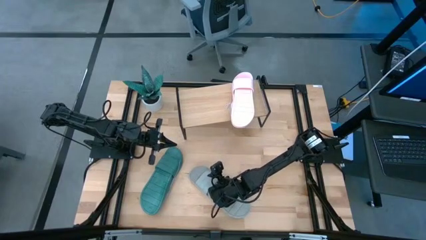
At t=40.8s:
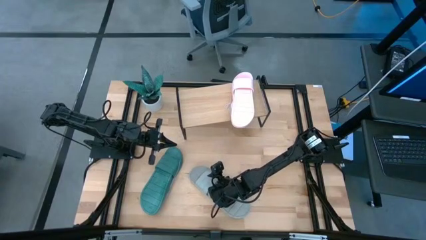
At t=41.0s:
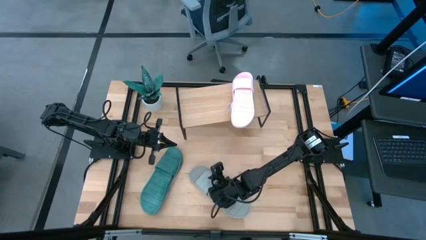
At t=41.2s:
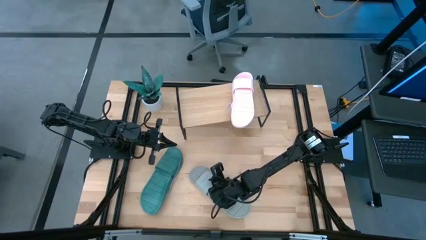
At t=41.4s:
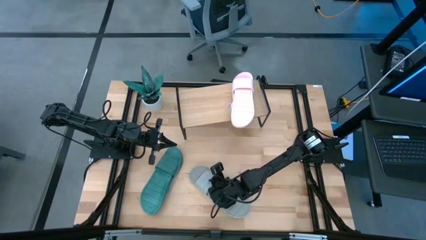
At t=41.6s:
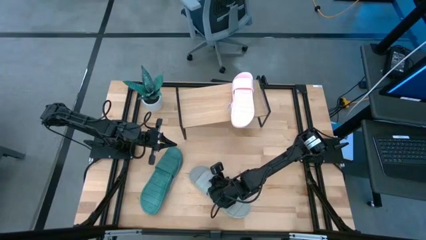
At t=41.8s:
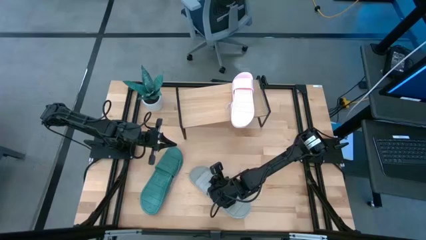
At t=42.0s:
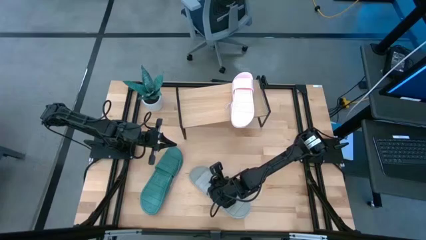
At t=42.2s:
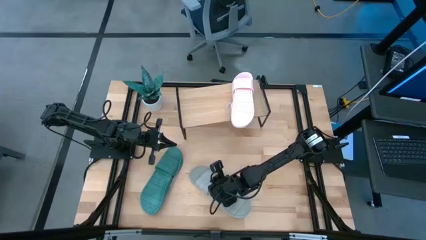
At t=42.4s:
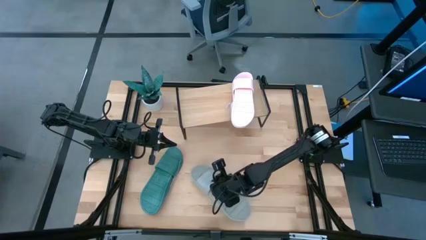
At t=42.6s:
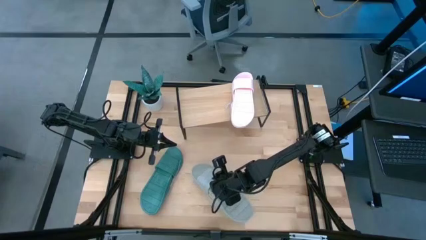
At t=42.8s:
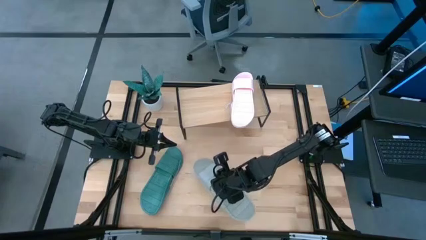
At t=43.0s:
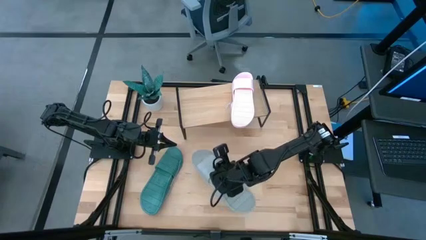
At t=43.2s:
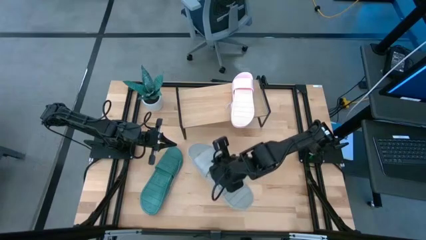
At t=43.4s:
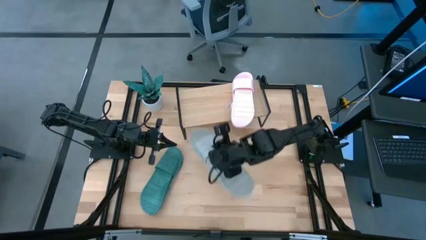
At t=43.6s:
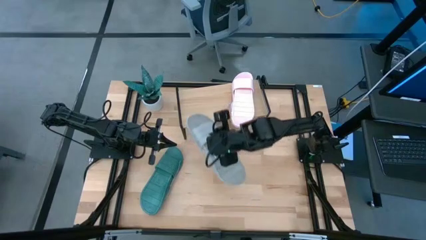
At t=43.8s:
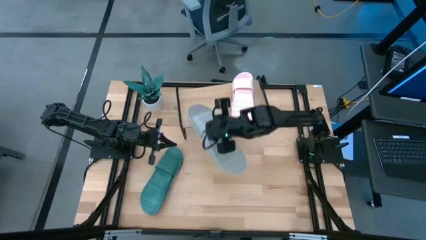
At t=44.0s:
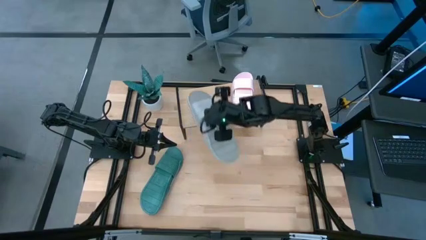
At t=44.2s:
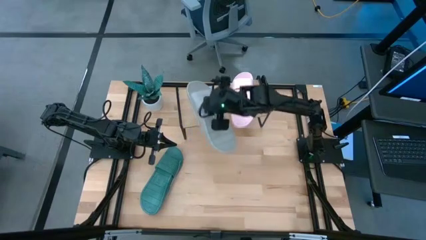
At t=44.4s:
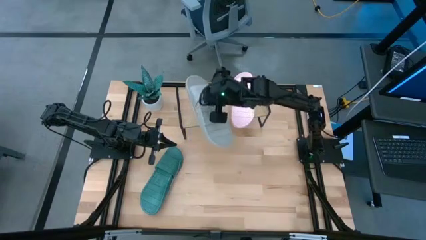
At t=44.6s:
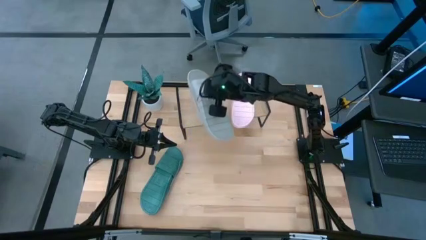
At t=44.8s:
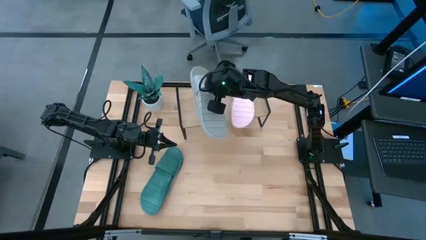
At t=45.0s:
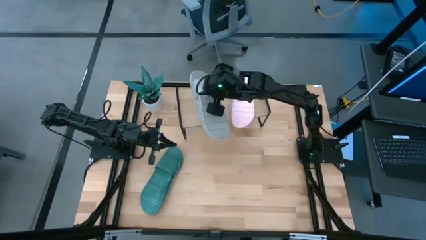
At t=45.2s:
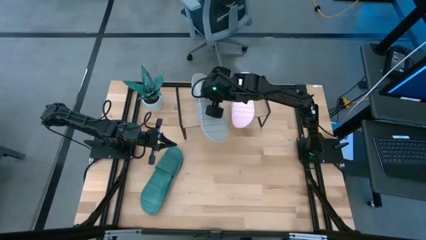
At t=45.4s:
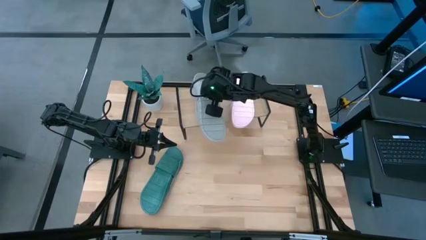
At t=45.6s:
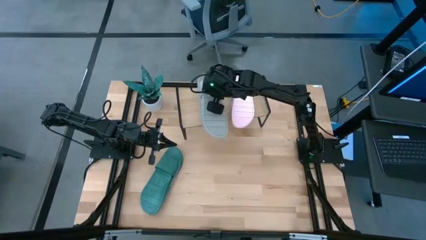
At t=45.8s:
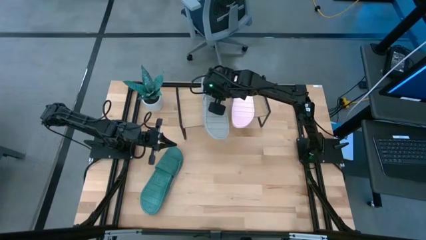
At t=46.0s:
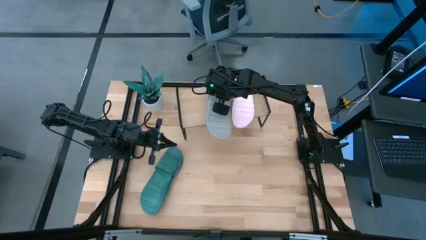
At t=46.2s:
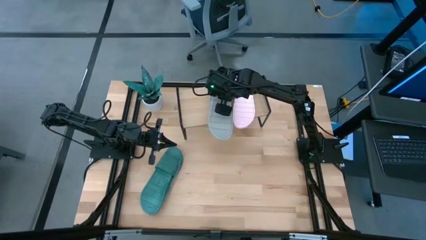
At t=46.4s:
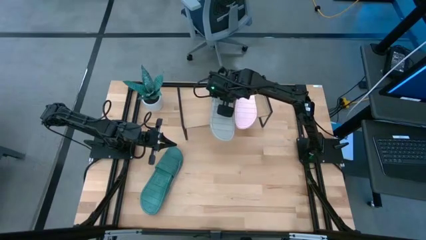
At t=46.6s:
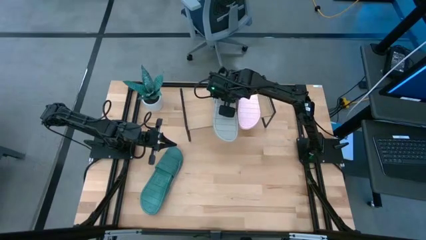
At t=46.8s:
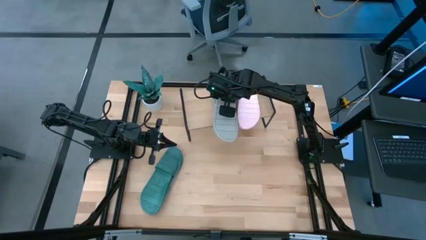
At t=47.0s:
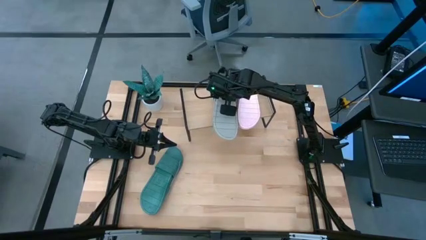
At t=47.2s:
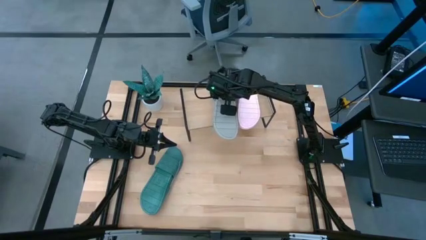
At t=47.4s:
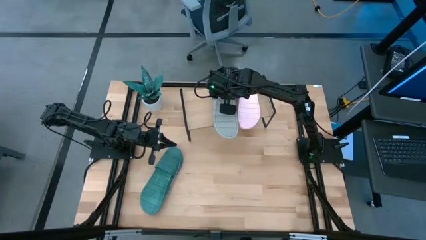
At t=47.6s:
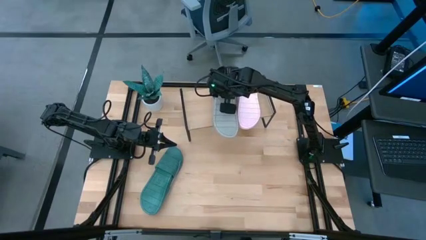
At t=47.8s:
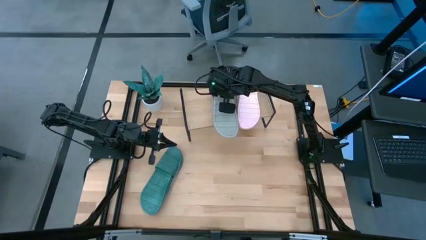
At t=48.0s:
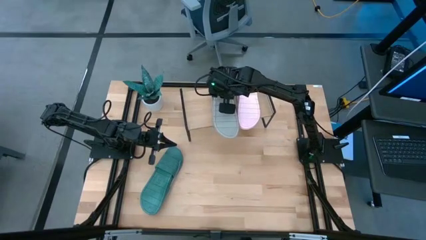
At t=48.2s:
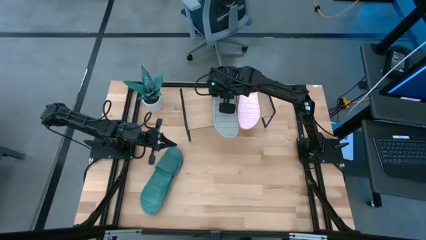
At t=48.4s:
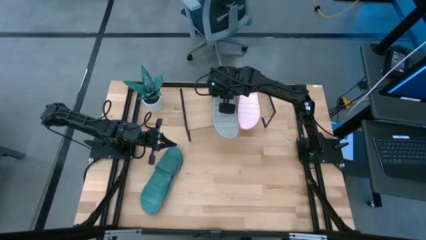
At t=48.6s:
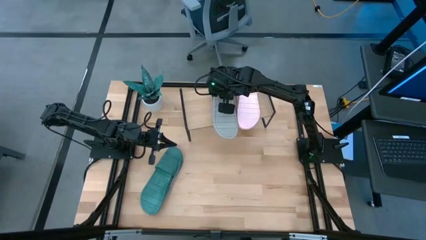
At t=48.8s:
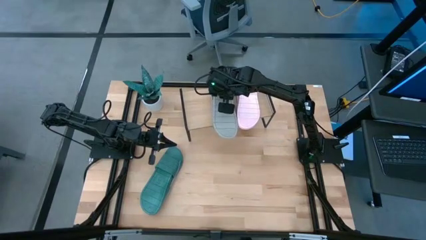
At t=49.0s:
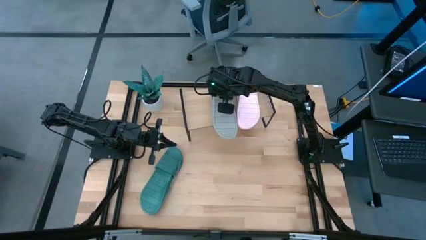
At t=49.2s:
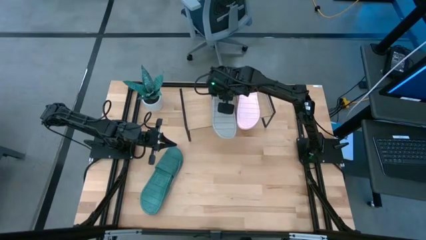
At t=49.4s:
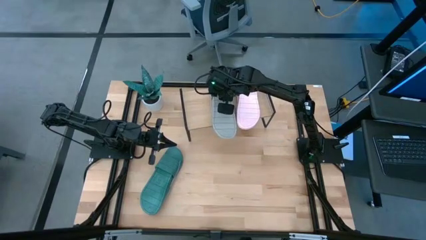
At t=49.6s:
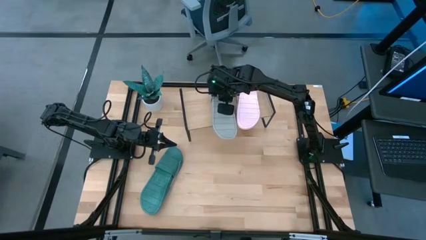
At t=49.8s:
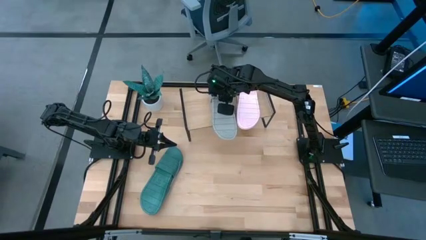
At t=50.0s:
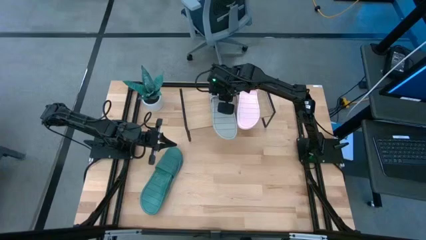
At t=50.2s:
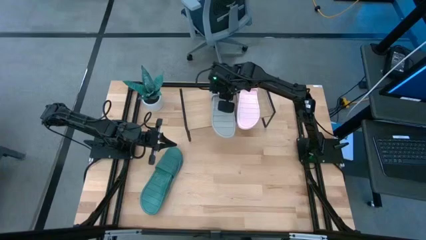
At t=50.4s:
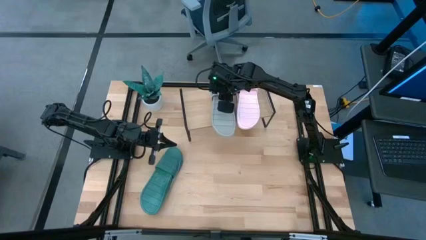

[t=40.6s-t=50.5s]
Task: Pick and place slides into the shelf
Put the gray pair of slides on the shelf
